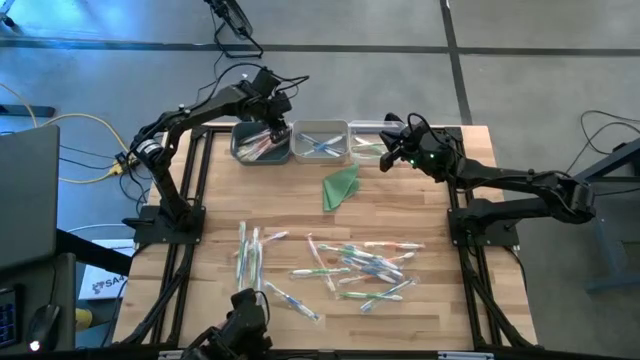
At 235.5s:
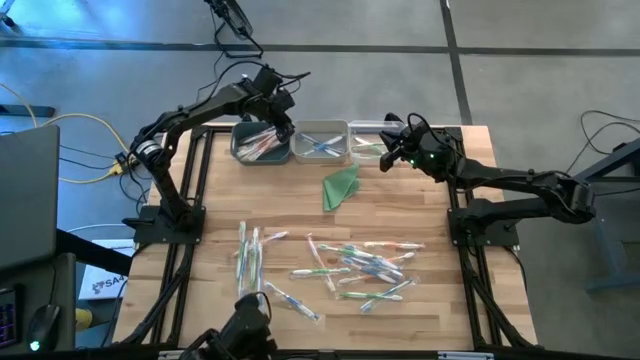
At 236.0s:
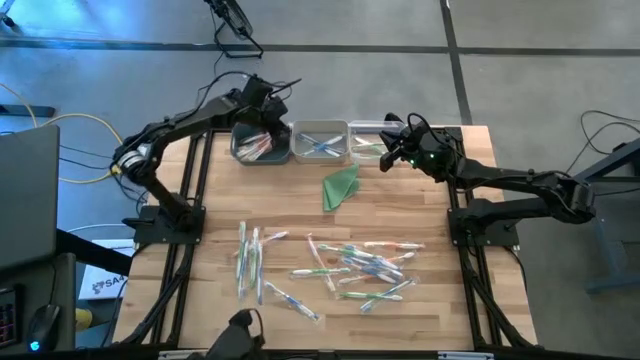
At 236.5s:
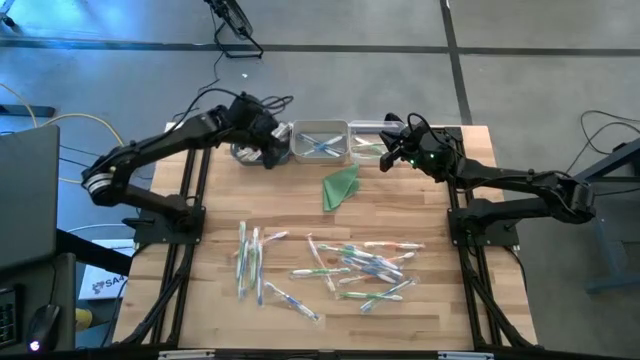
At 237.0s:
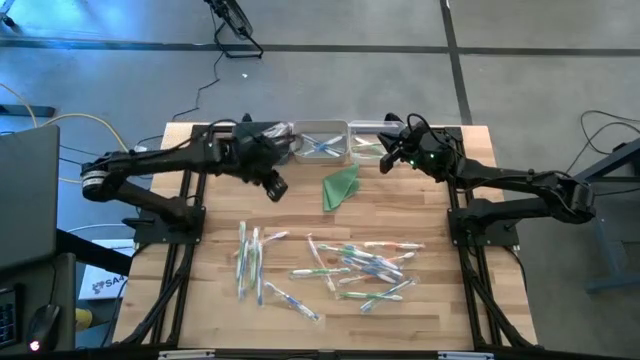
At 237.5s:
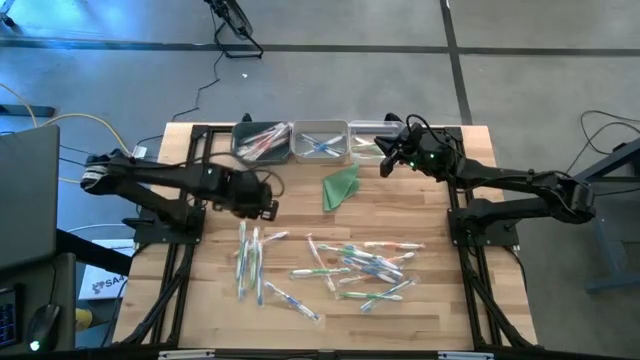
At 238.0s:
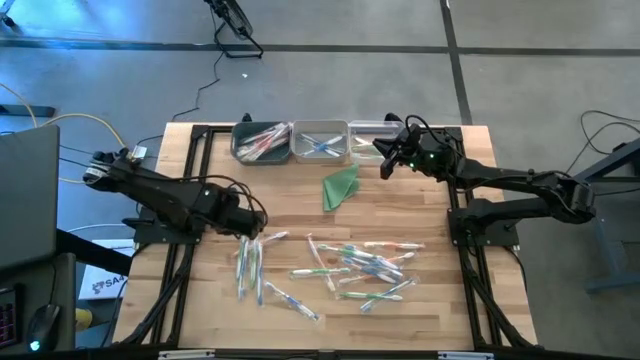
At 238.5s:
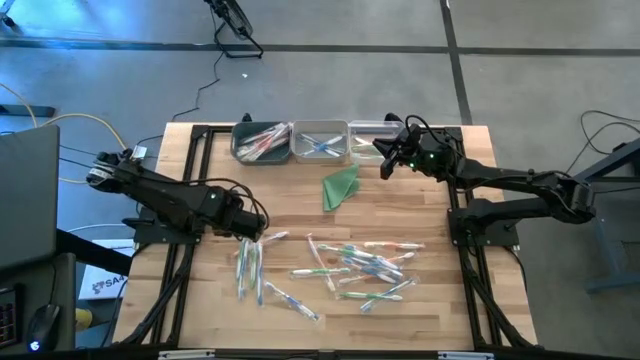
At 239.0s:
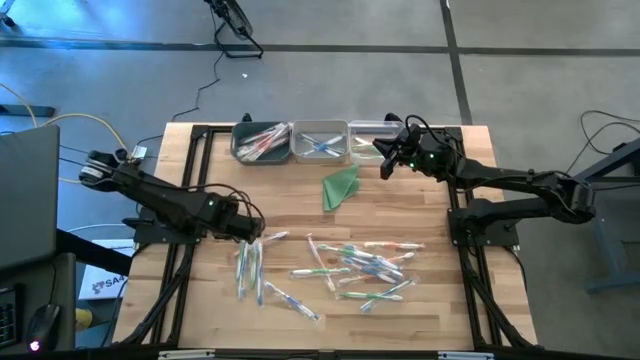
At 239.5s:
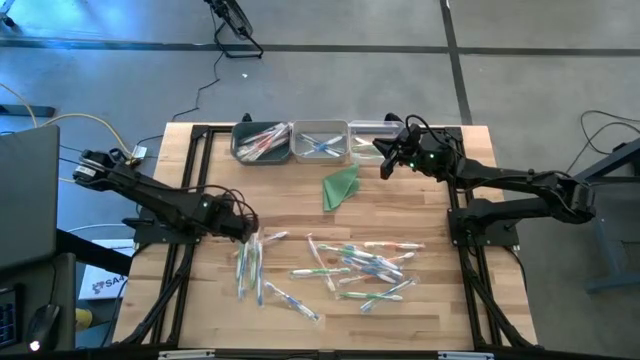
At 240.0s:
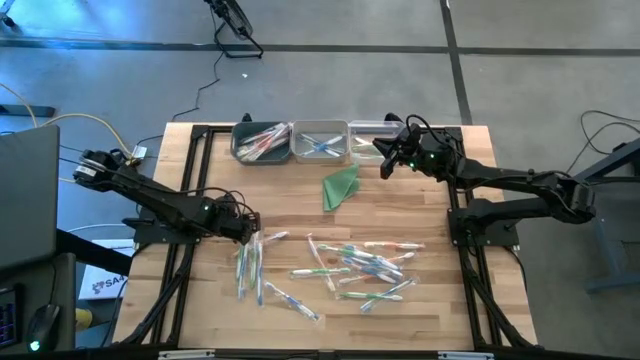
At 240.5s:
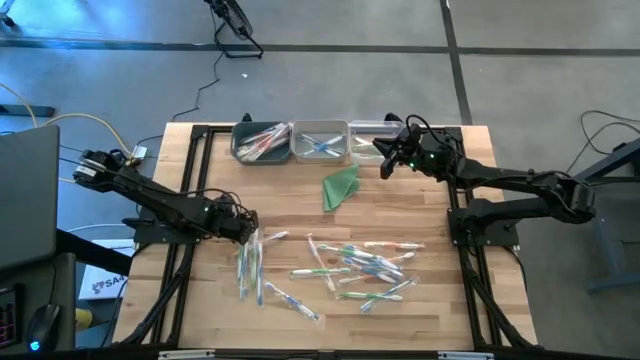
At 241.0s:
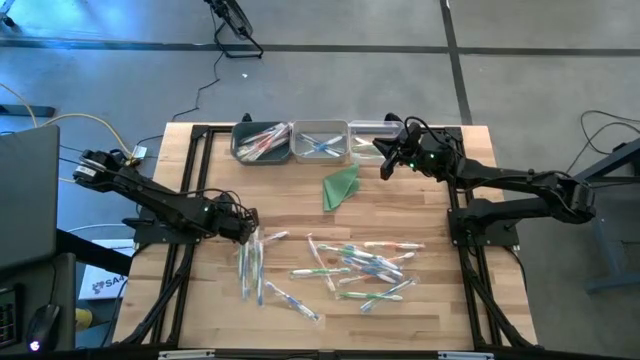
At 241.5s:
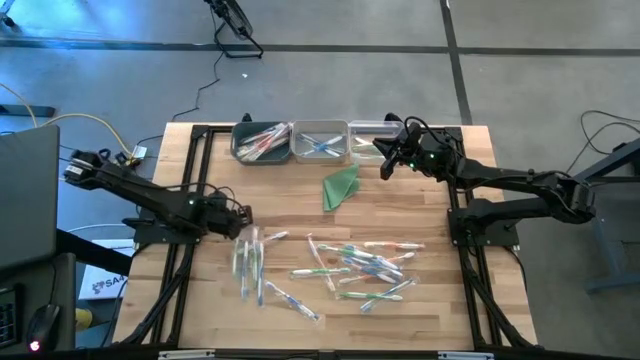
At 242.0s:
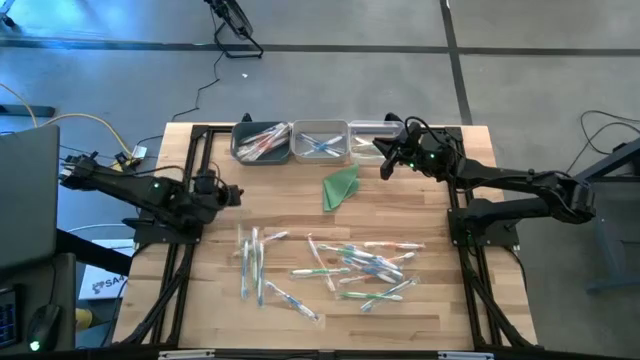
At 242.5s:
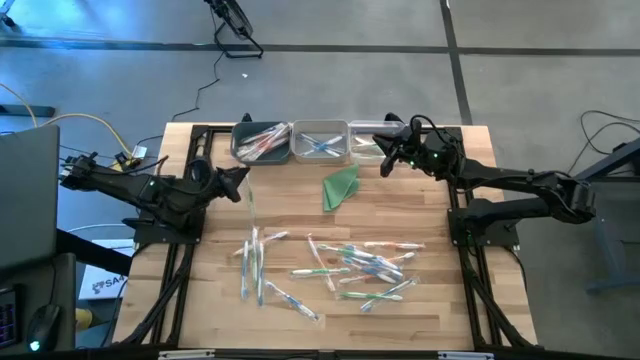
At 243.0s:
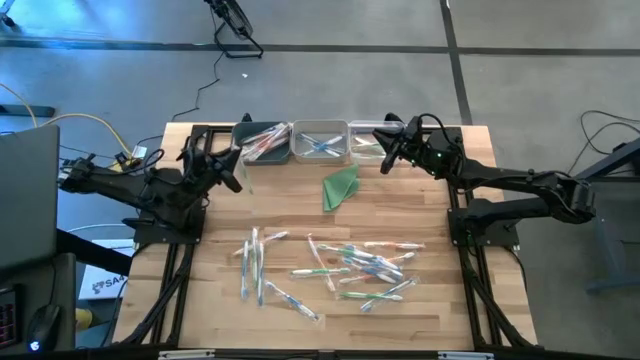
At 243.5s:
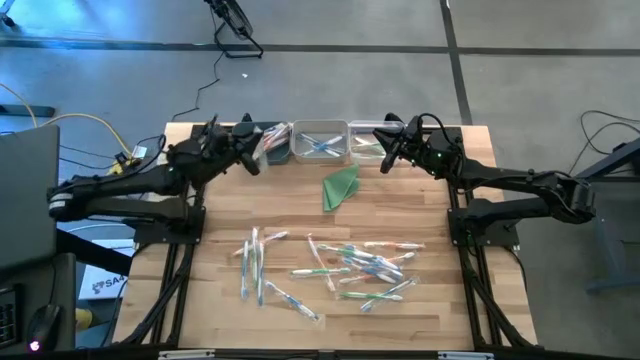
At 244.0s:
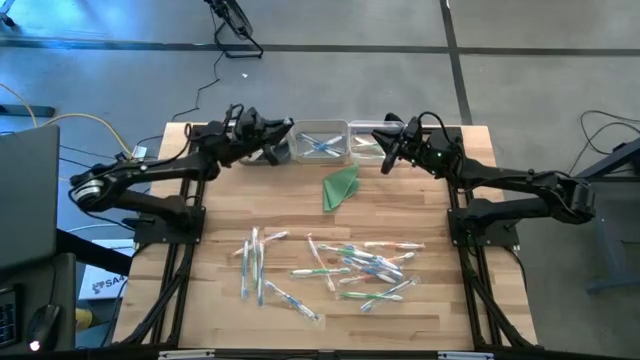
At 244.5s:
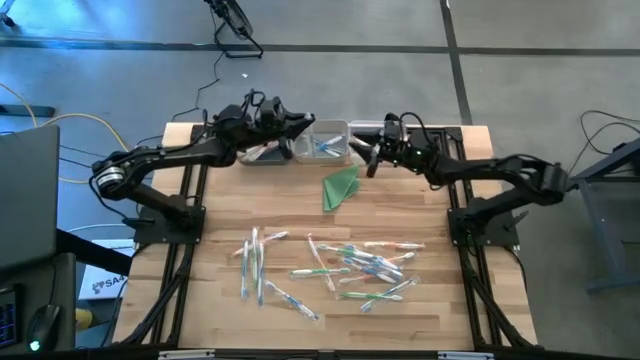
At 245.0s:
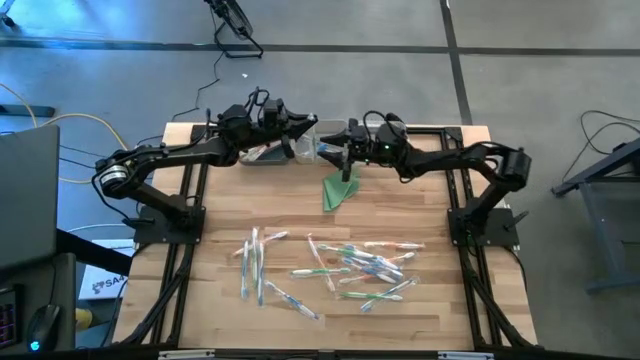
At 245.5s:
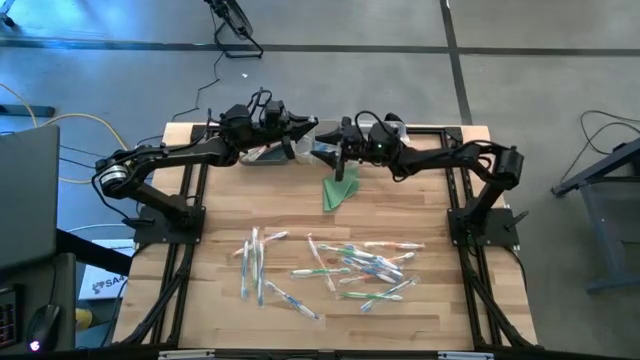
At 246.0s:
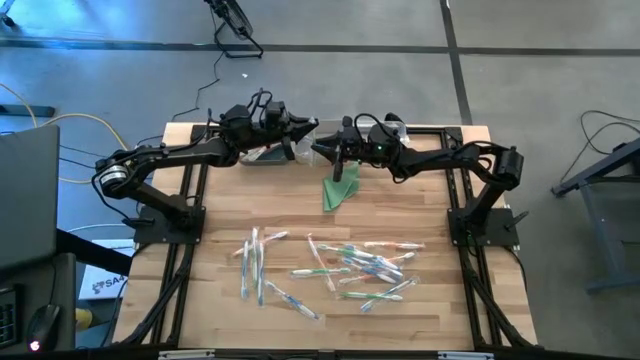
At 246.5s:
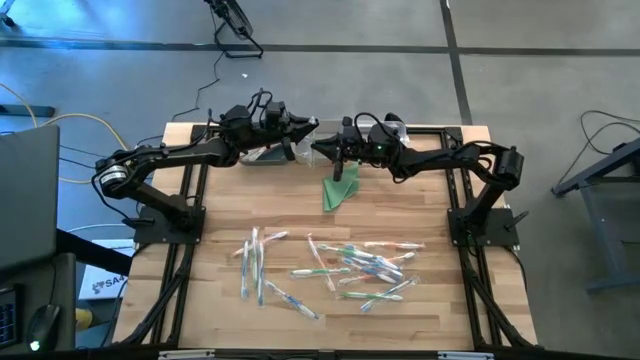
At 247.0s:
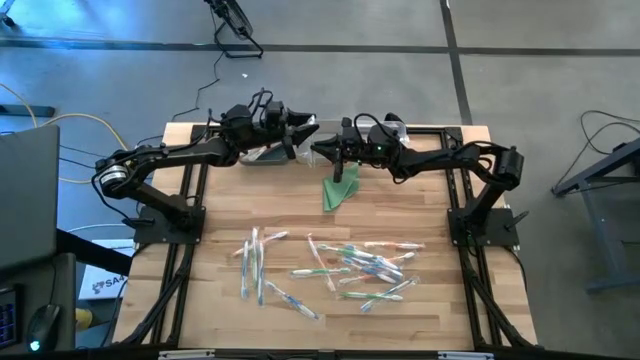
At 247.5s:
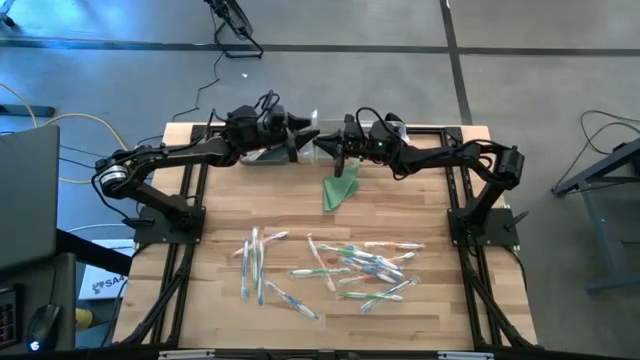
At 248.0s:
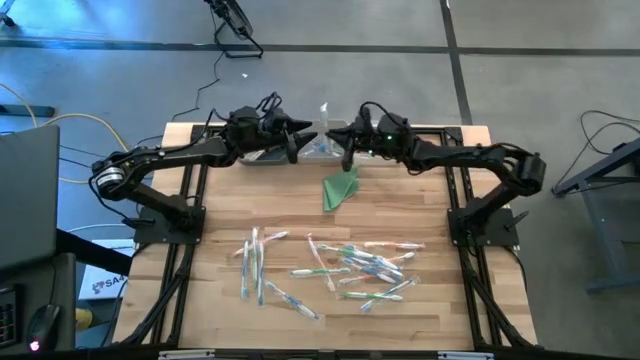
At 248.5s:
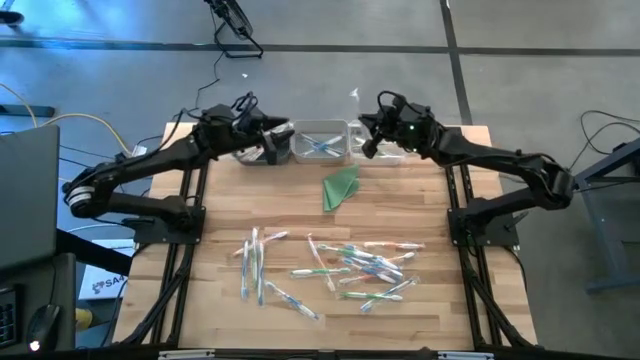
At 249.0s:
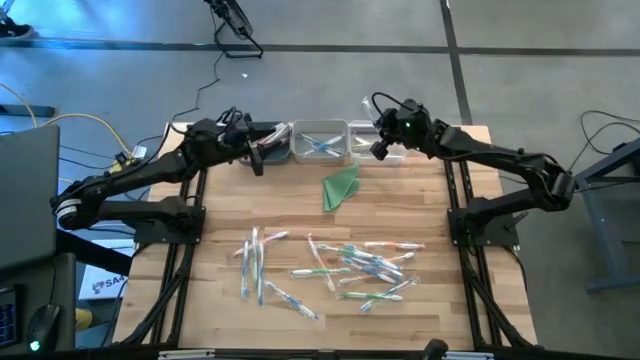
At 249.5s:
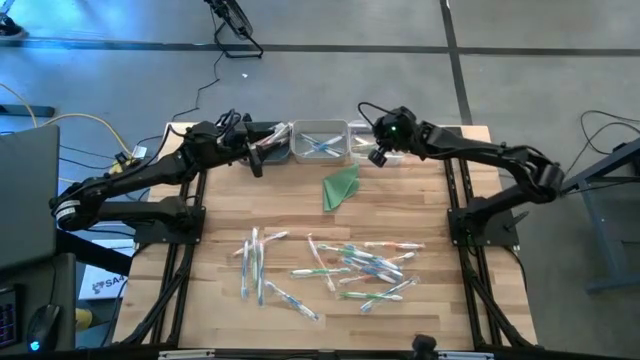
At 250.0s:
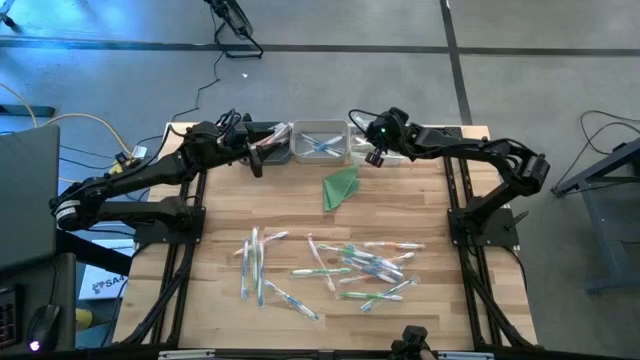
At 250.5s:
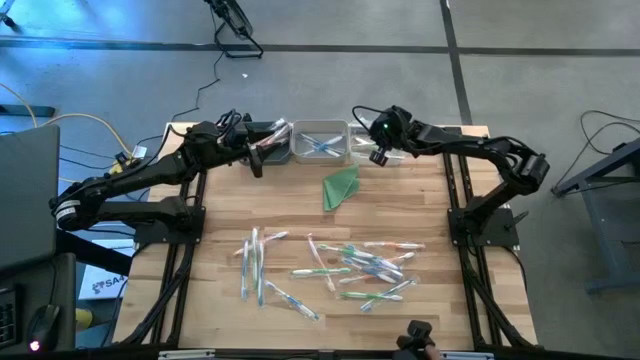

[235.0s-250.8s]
Task: Pick & Place Toothbrushes
Put the green toothbrush into the transparent bin

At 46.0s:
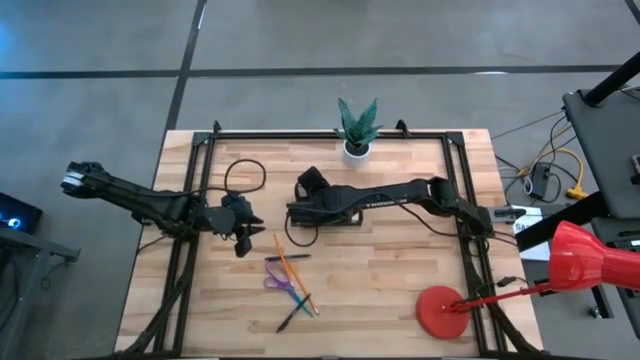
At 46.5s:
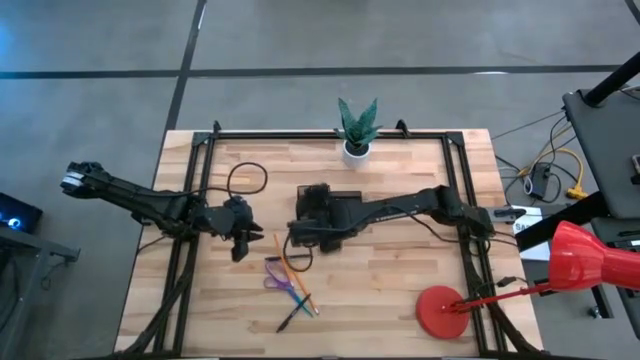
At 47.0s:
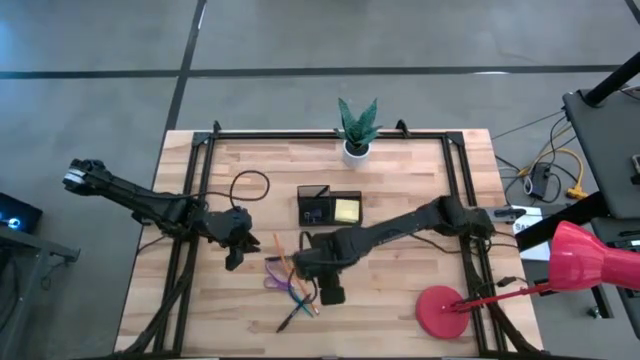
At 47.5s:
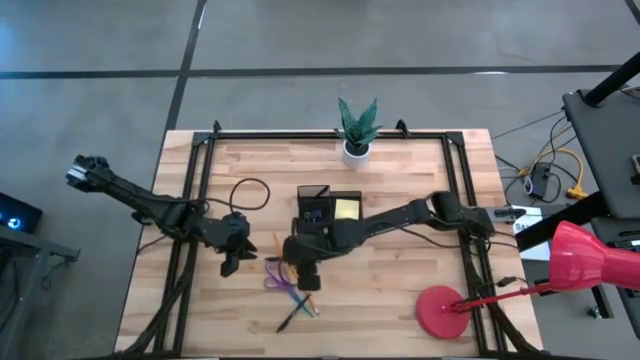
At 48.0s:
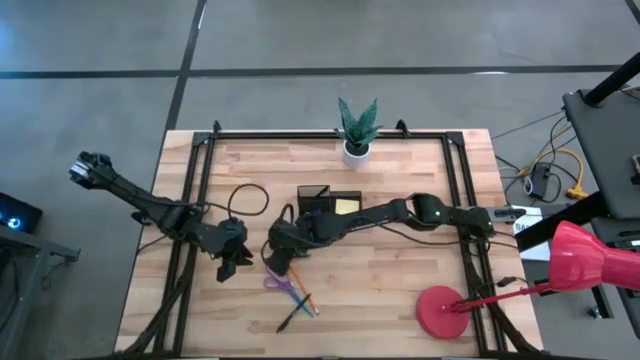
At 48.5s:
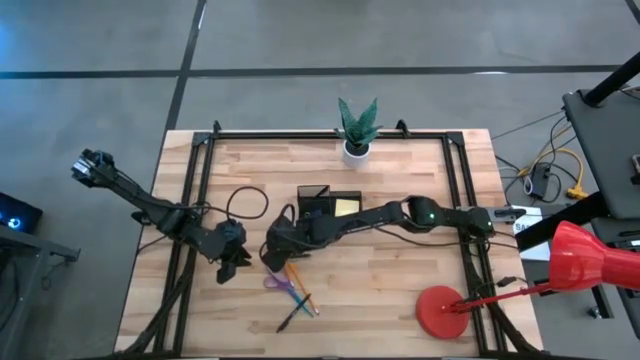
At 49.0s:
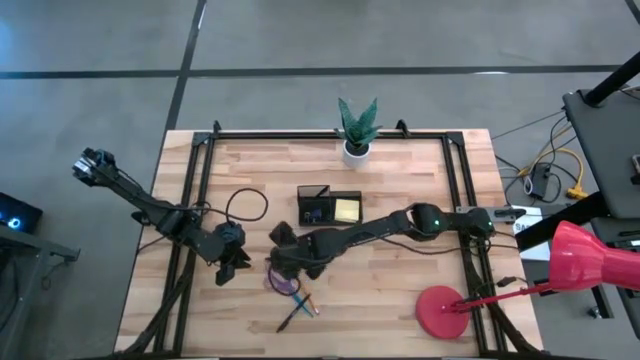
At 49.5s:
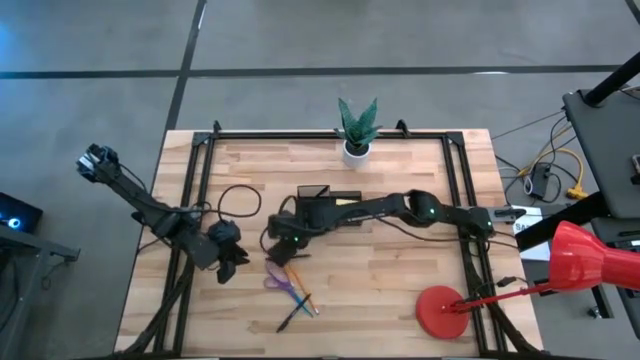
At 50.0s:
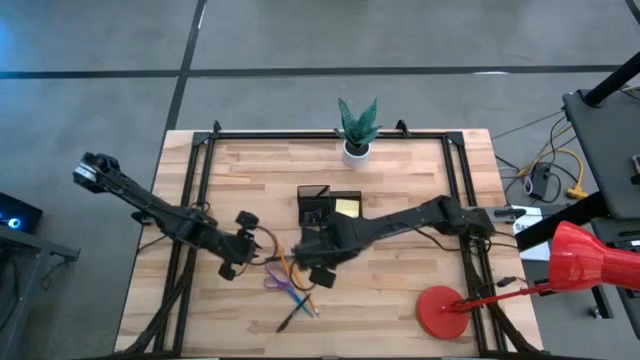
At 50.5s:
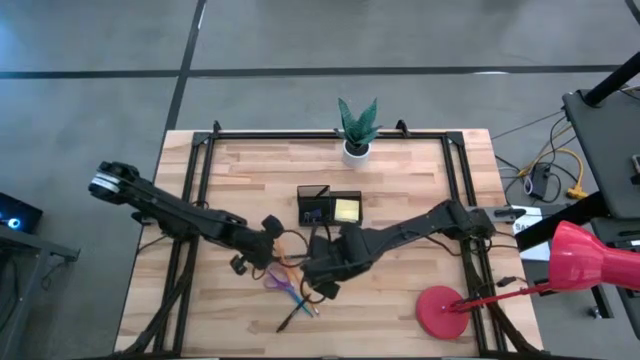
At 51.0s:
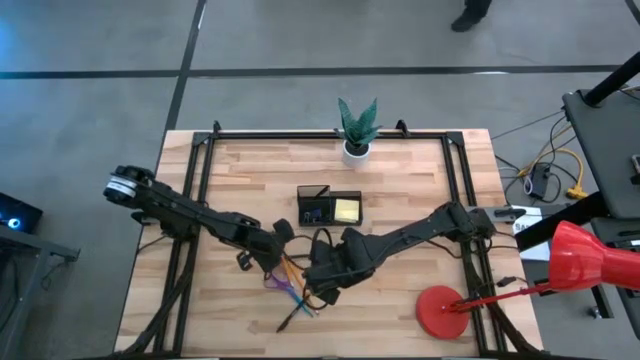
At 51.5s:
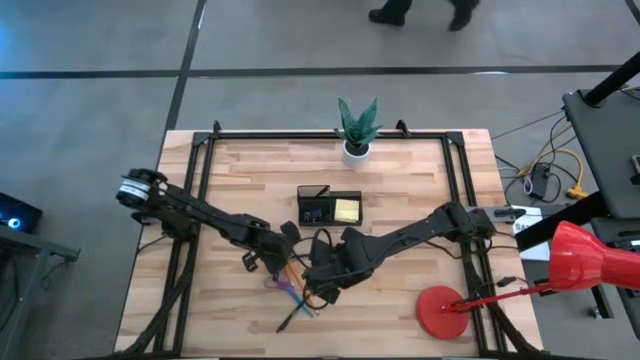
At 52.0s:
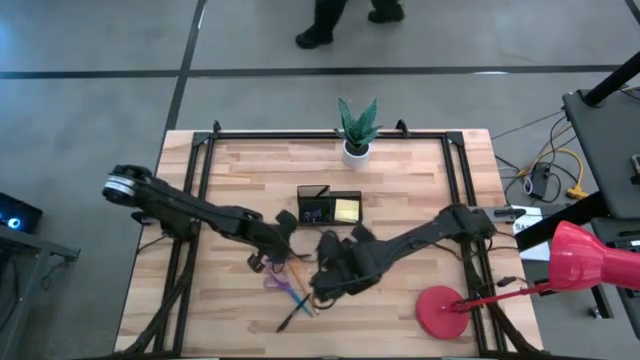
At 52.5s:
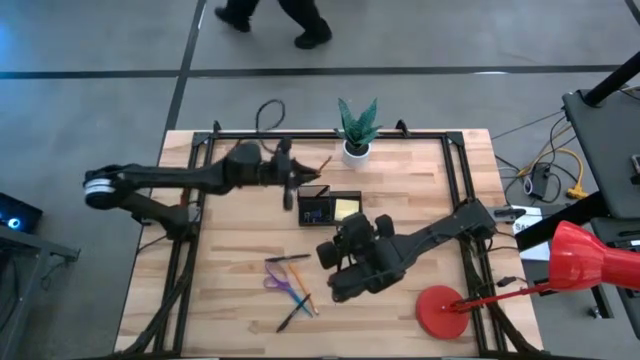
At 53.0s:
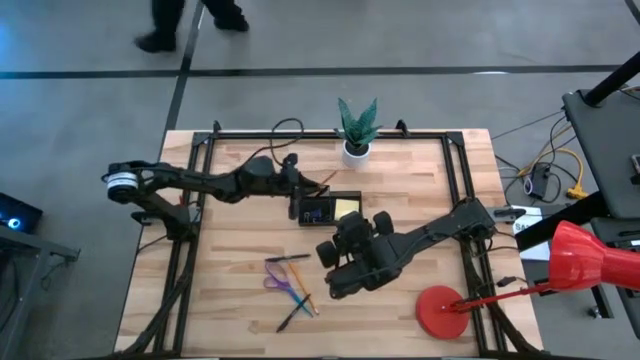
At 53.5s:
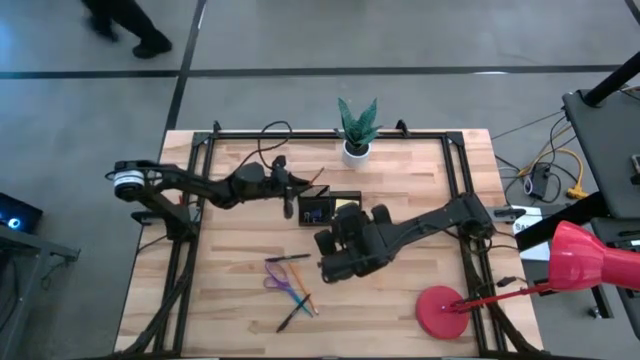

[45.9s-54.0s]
Task: Pick and place office supplies into organizer
Put the left pencil into the desk organizer
